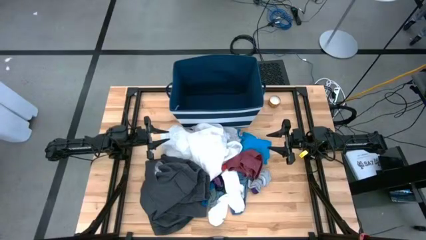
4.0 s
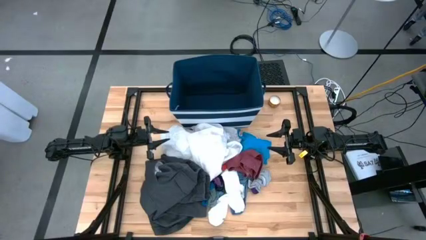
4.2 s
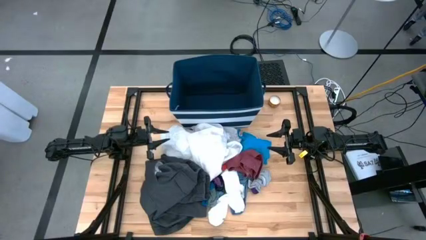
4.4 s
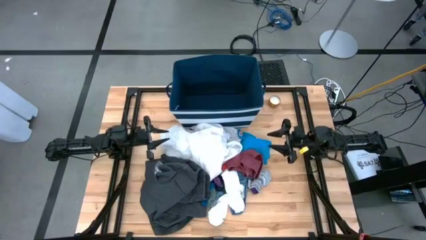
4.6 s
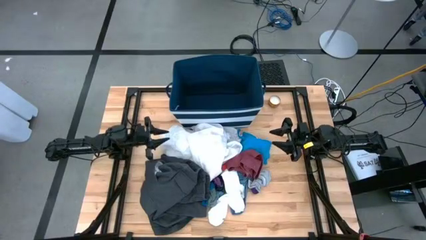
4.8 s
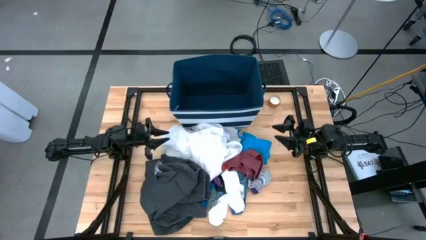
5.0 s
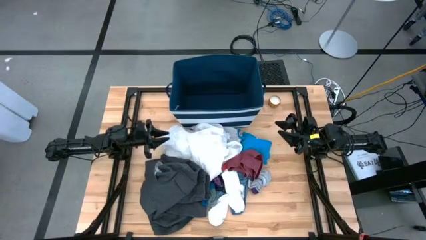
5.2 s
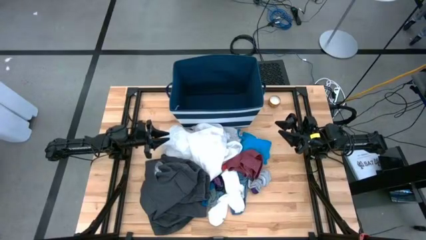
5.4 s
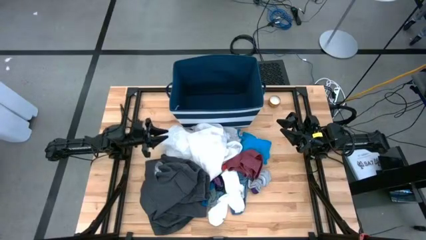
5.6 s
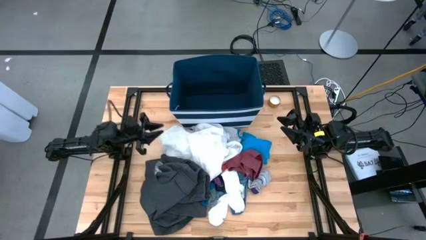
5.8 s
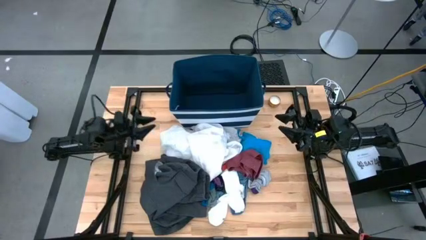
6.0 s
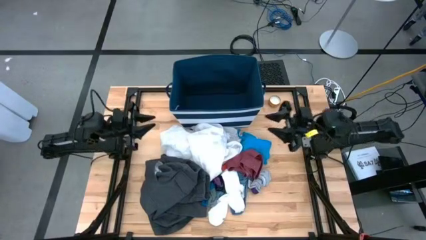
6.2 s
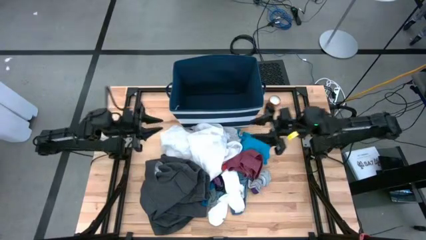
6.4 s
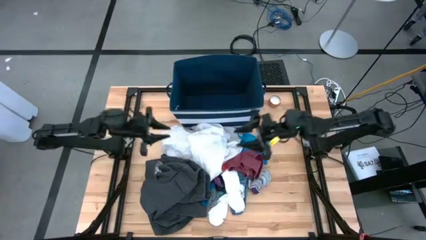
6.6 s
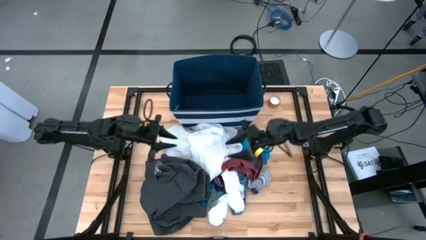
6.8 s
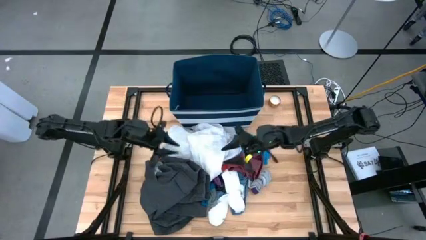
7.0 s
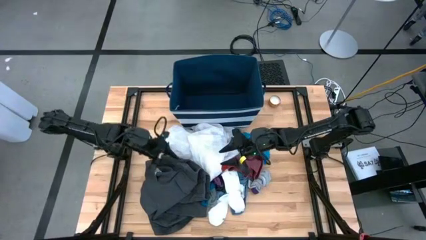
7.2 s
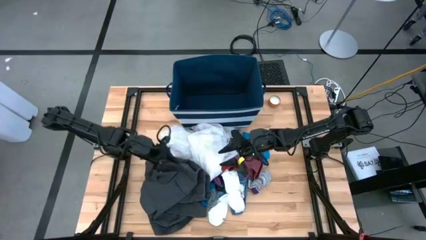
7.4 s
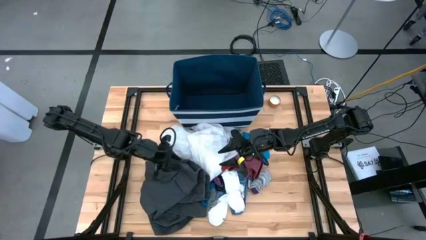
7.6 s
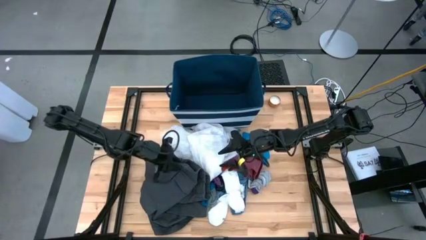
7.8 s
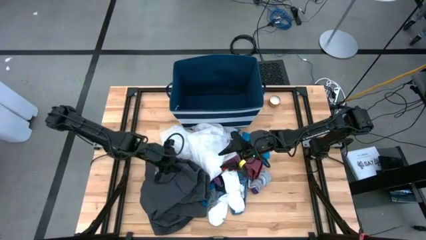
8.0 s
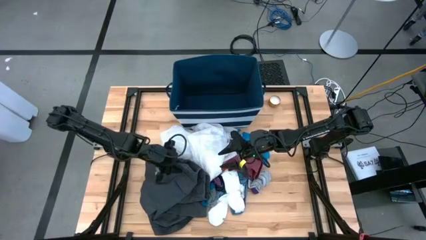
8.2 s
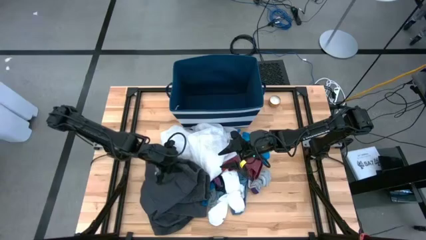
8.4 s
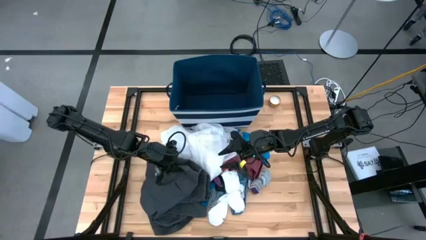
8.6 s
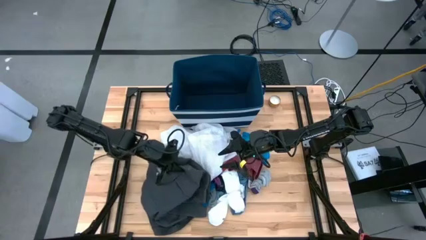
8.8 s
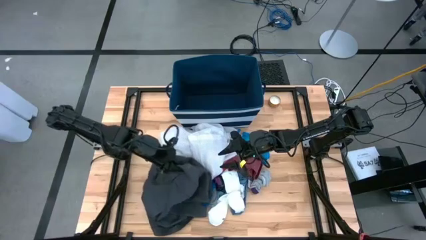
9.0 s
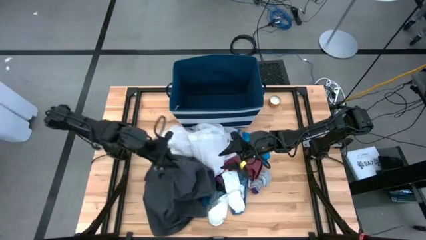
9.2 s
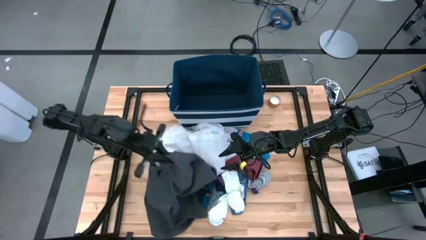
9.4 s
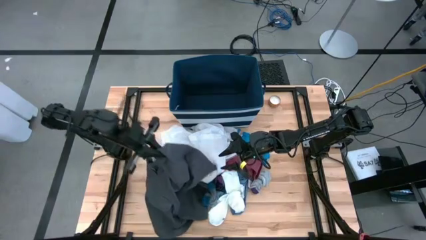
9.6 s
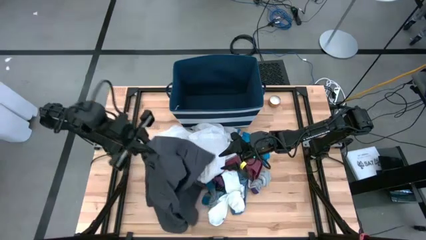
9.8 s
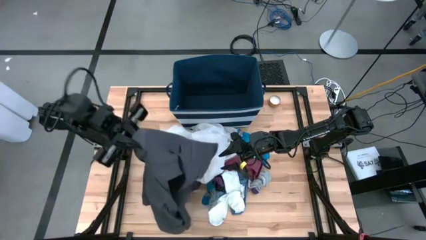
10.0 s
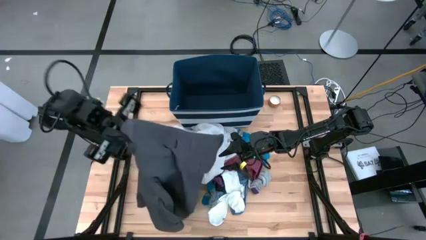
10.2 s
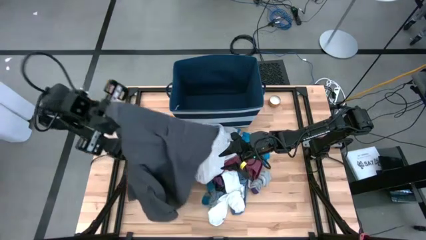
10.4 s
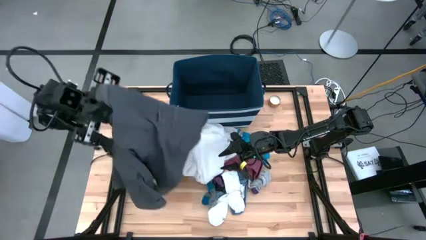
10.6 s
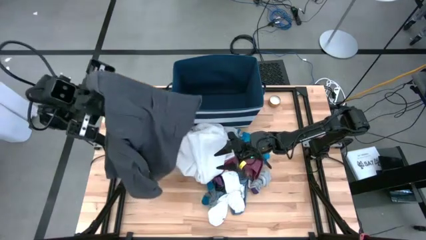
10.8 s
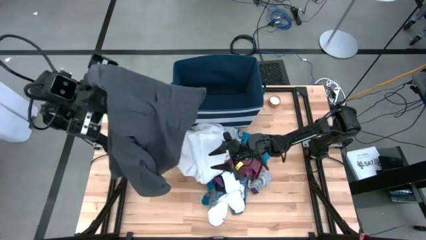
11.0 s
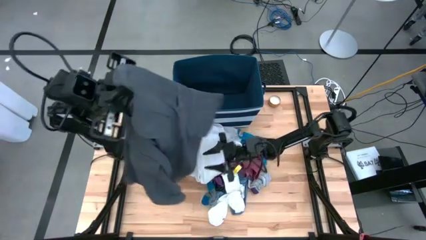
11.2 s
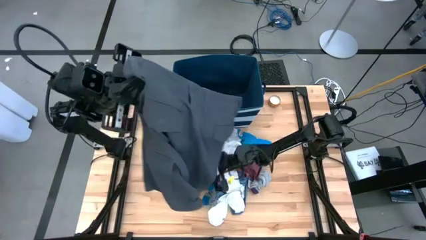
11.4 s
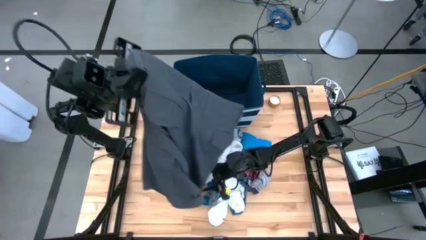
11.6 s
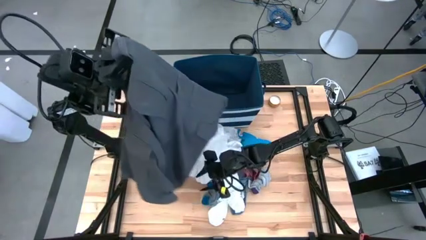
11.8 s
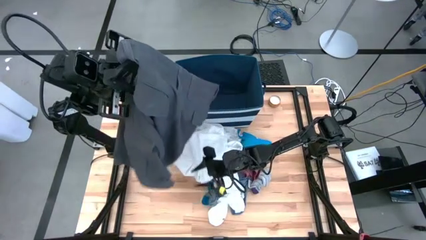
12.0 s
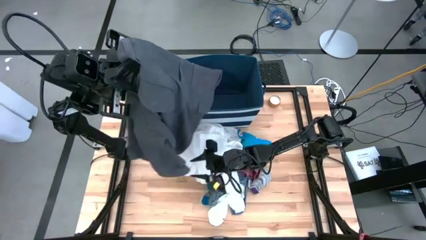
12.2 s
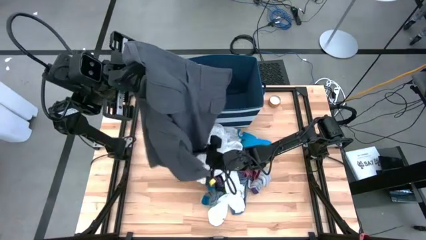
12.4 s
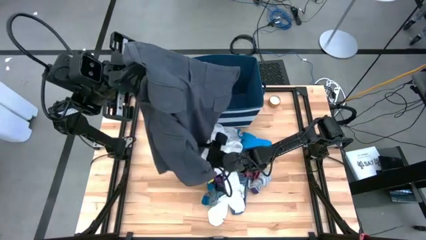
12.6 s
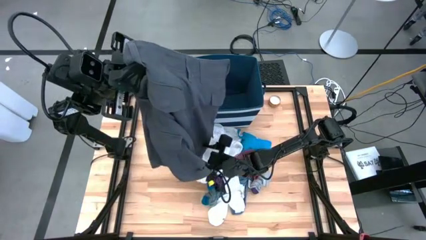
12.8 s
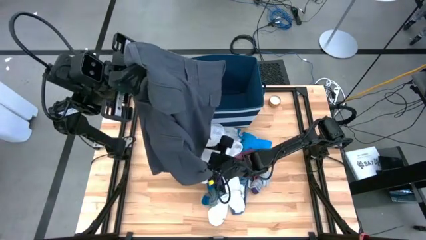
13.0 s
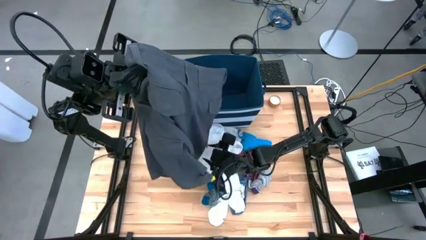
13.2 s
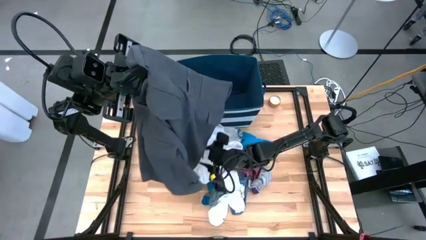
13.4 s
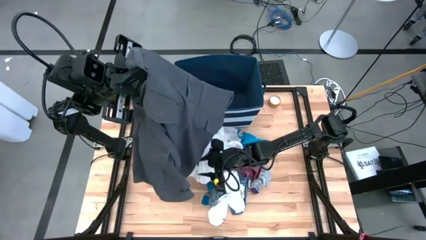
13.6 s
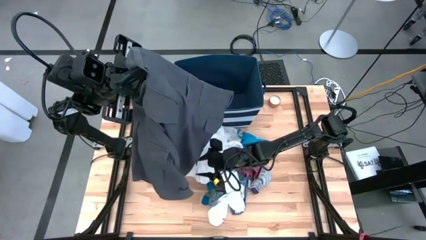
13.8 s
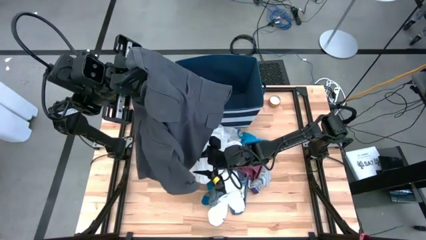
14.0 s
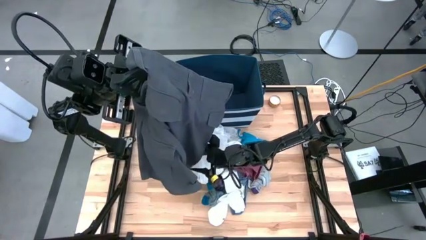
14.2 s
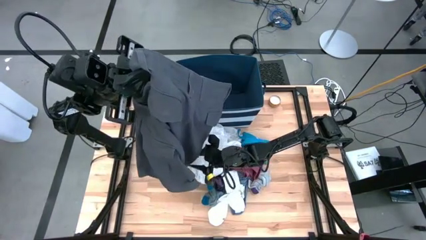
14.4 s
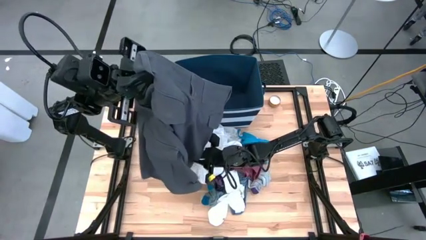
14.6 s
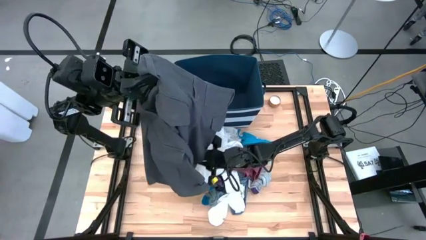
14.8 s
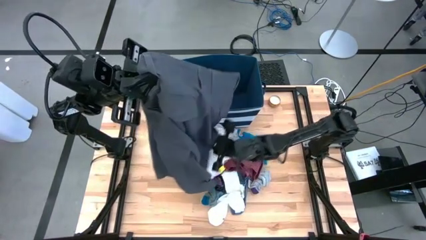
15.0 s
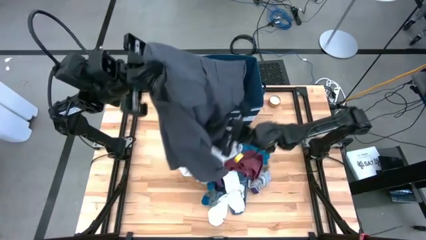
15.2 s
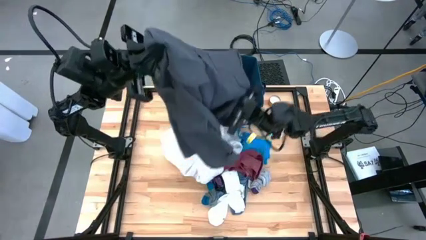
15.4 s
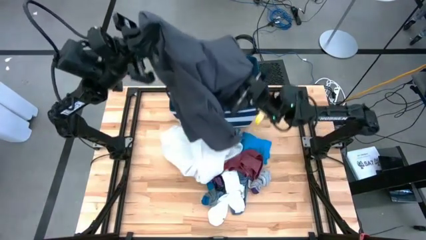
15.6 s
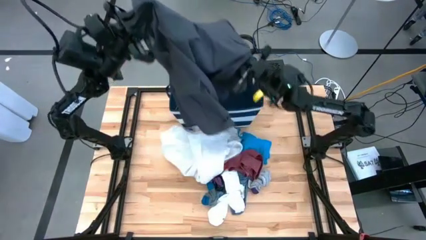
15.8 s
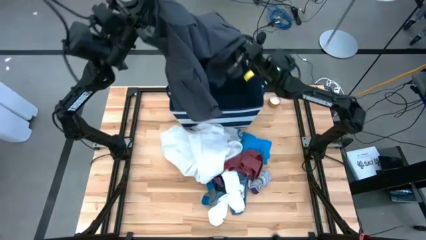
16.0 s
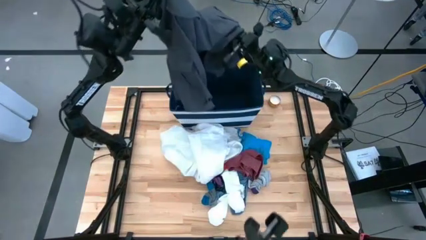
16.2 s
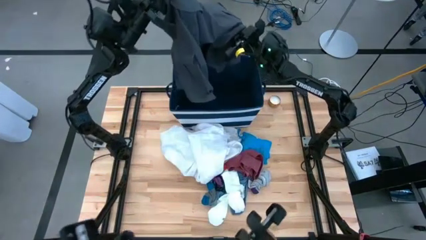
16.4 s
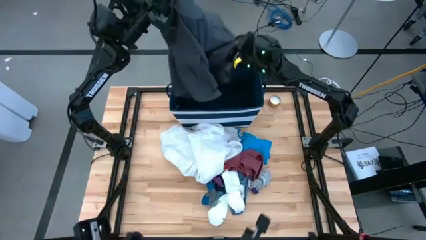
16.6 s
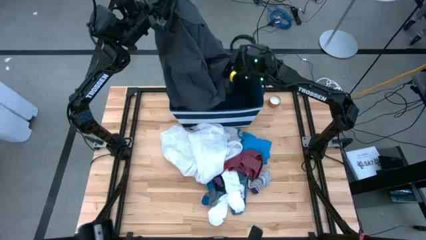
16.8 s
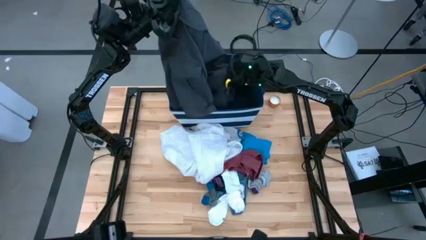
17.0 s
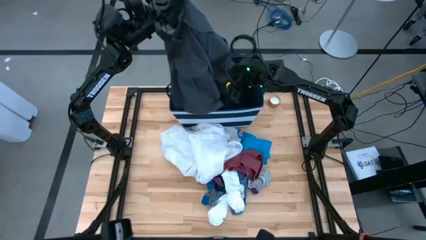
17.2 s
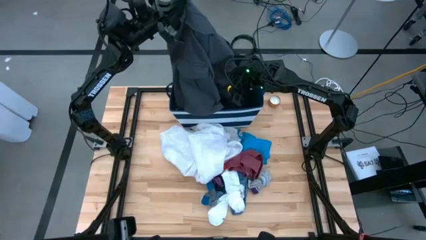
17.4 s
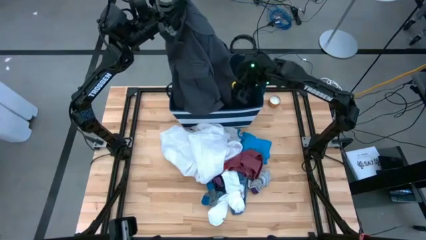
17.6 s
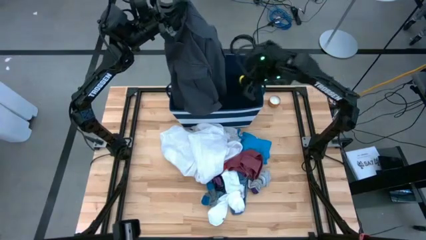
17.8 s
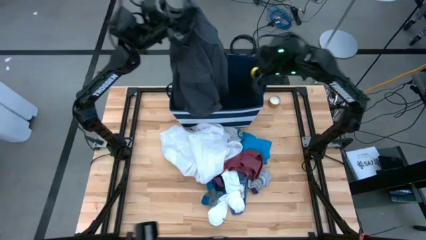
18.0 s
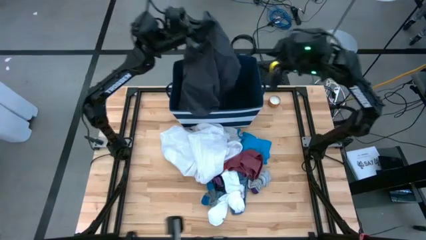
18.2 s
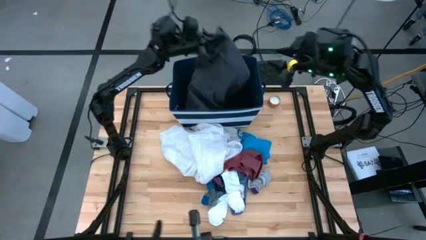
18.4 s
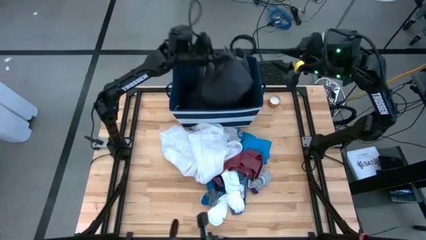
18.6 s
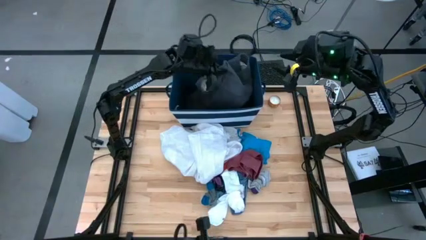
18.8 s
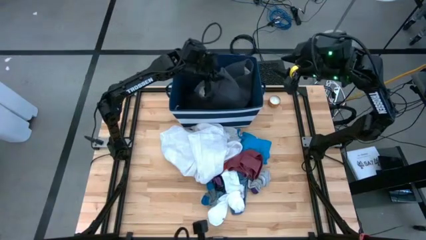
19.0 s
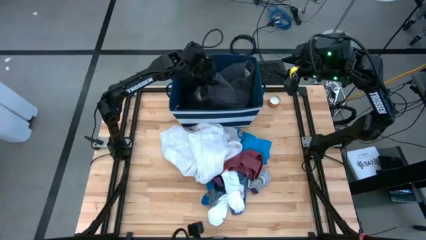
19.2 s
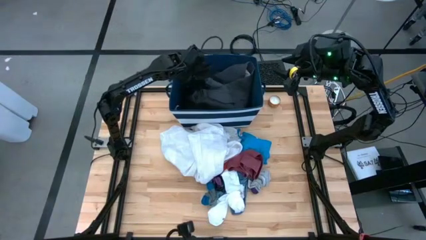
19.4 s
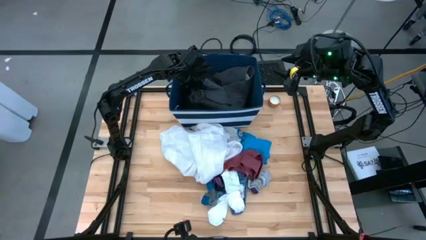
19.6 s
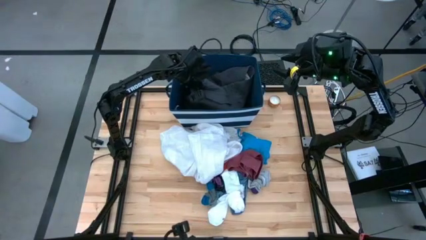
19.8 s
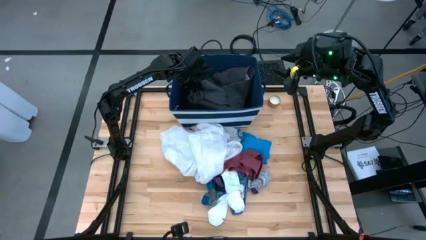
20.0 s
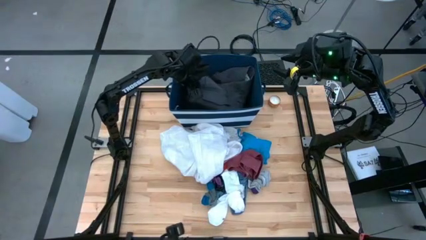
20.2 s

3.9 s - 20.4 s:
Task: Sort clothes
Put the black shorts into the blue laundry organizer
